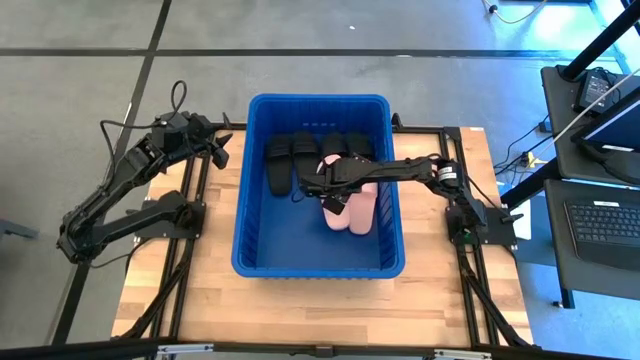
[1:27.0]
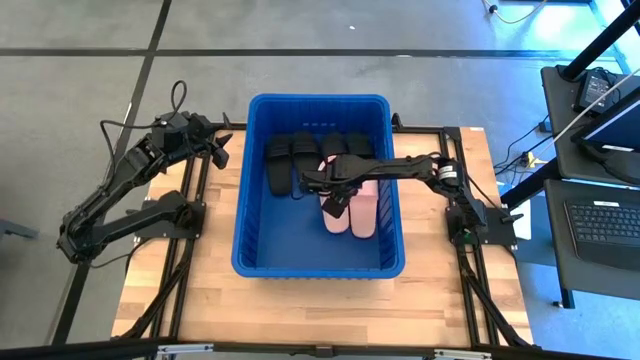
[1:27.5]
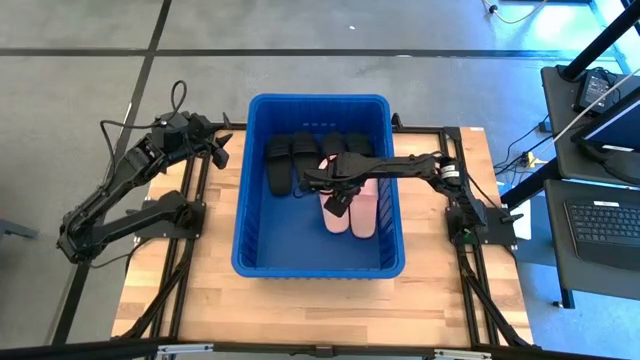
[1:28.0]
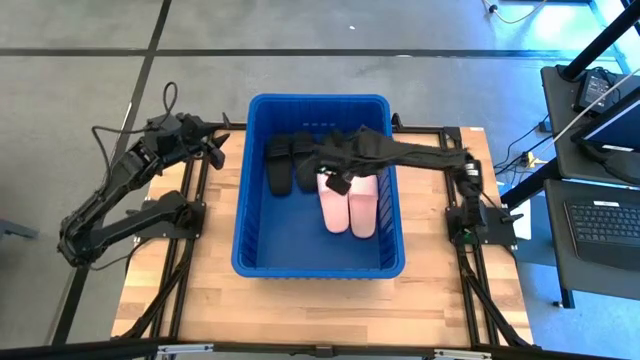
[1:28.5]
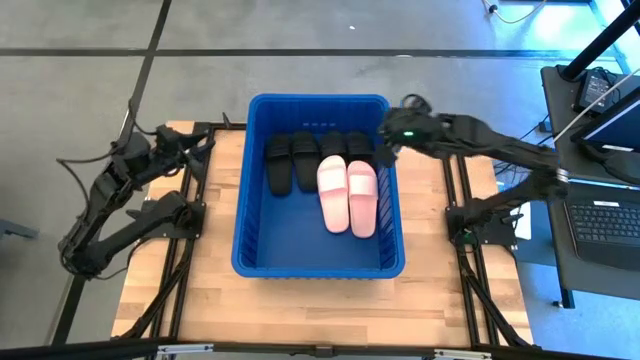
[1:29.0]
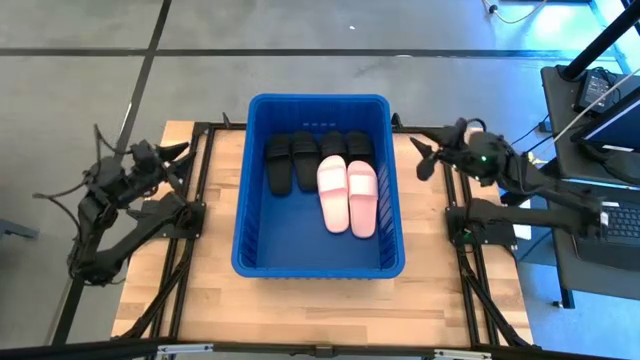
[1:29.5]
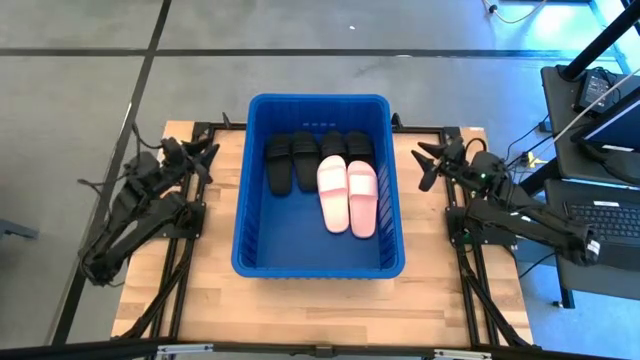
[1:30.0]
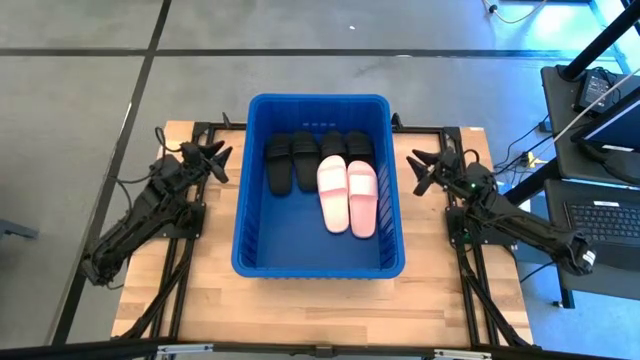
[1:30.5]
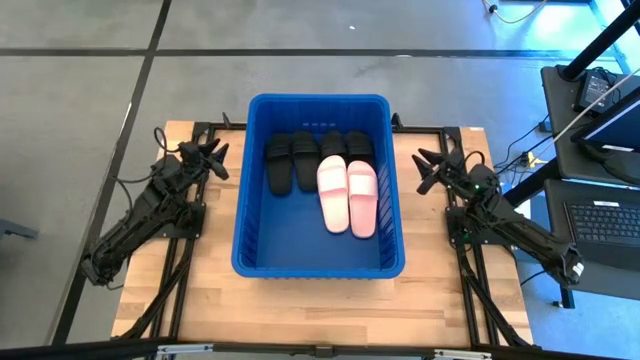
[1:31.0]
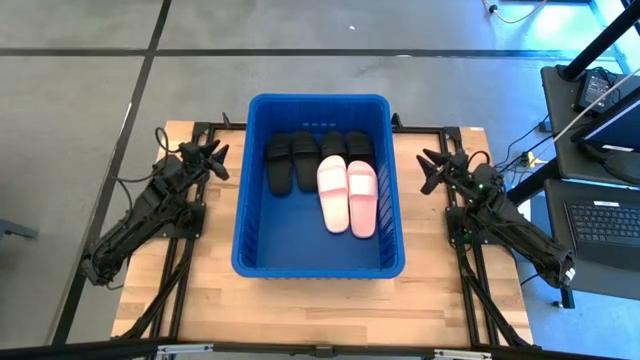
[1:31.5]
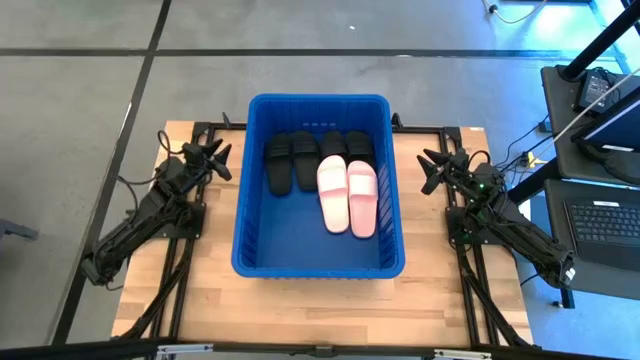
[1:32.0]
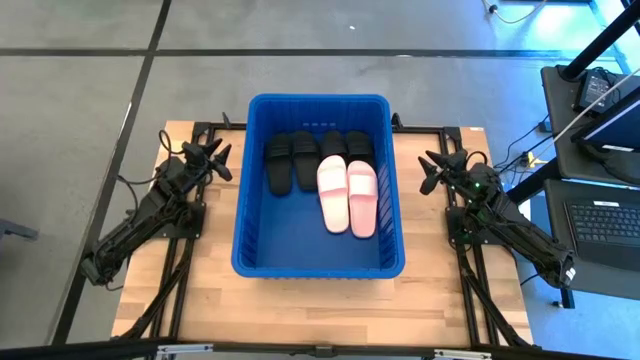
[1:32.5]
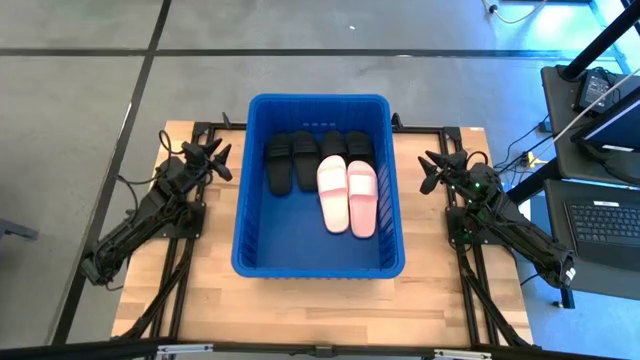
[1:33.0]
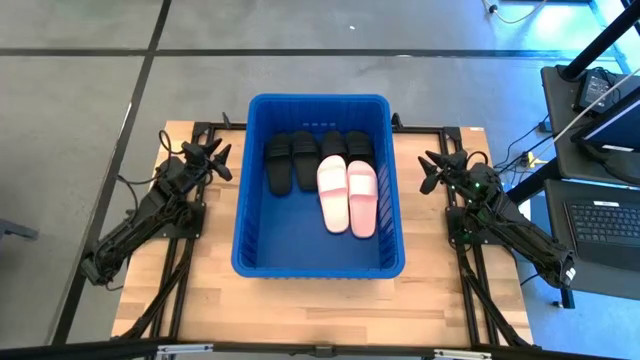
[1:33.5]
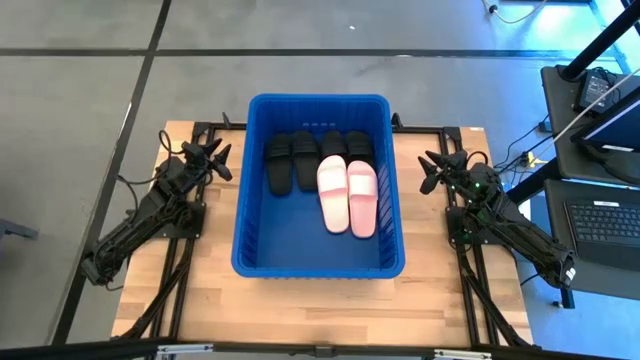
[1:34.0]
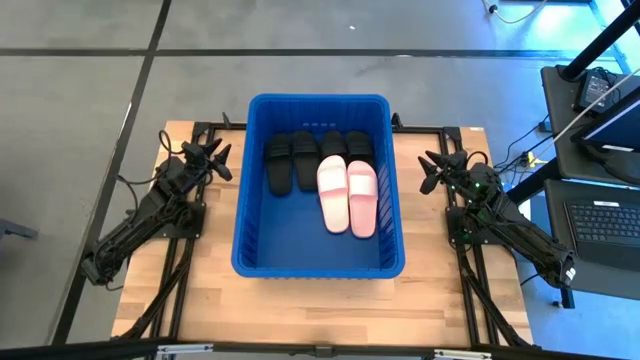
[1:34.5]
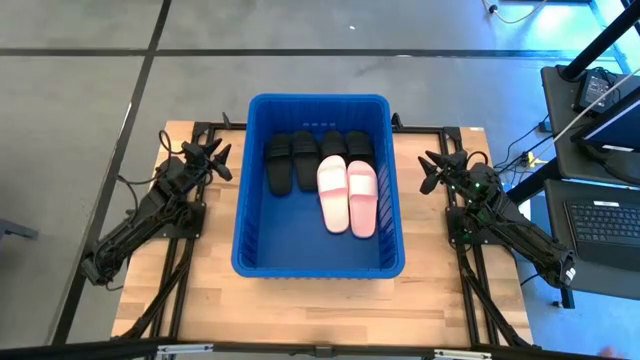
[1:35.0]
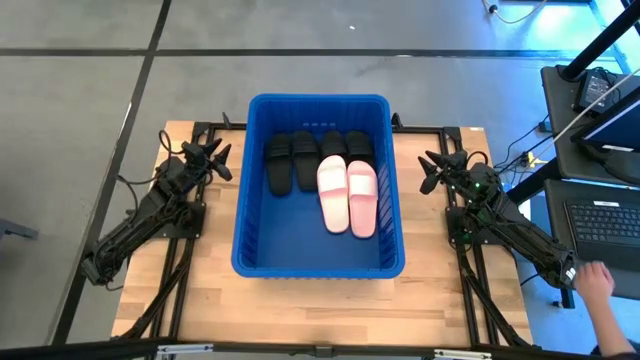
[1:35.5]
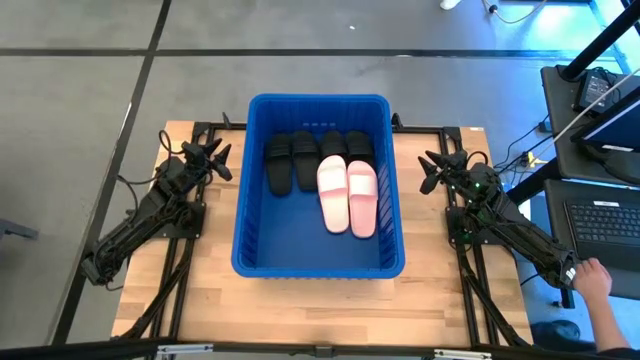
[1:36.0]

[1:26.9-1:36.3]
Task: Pick and place slides into bin
Return to Home Position

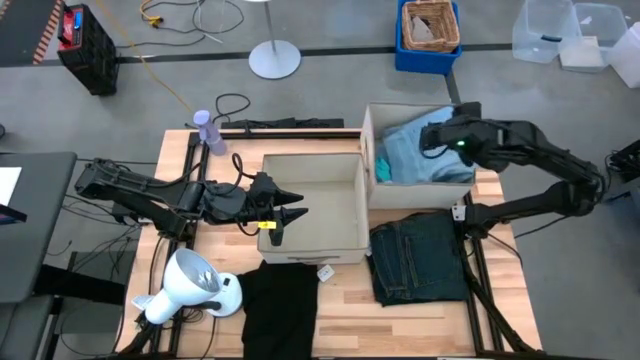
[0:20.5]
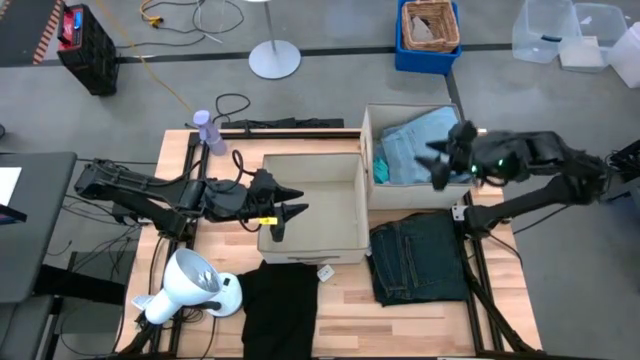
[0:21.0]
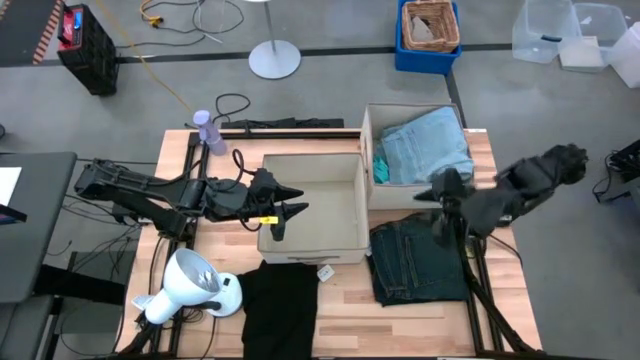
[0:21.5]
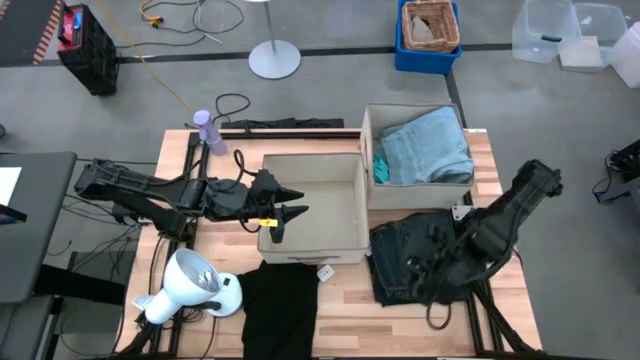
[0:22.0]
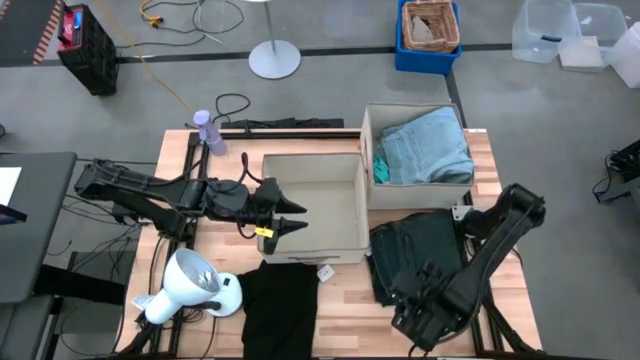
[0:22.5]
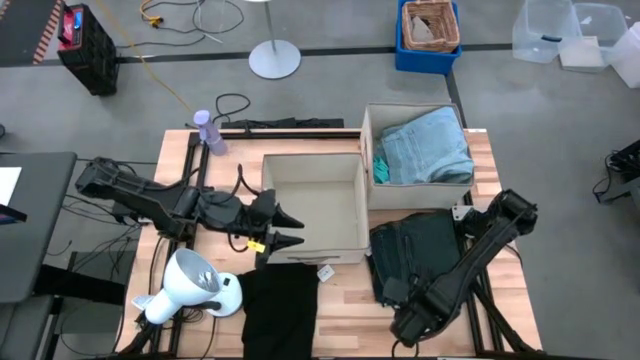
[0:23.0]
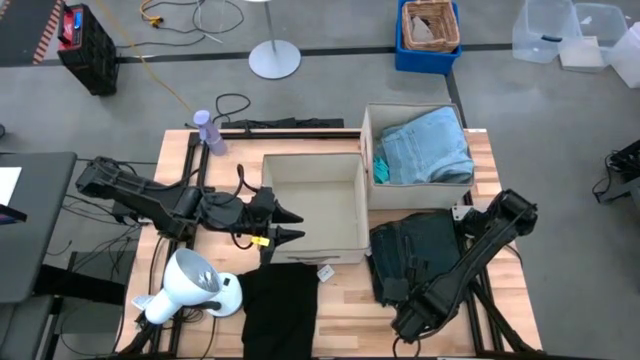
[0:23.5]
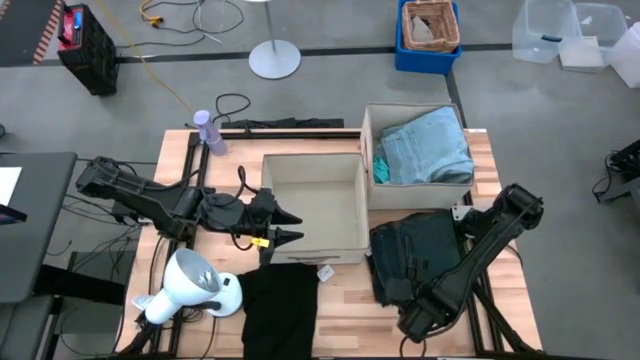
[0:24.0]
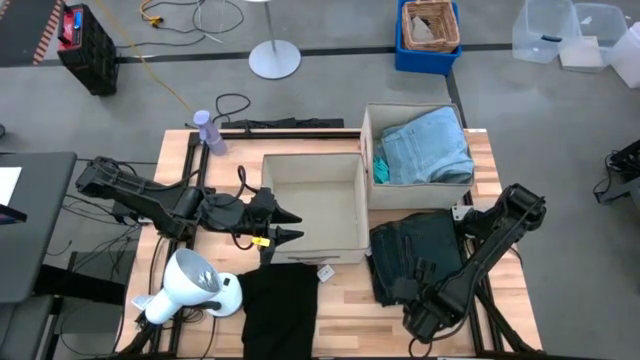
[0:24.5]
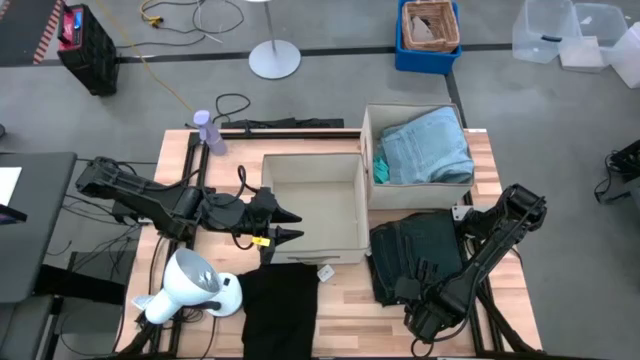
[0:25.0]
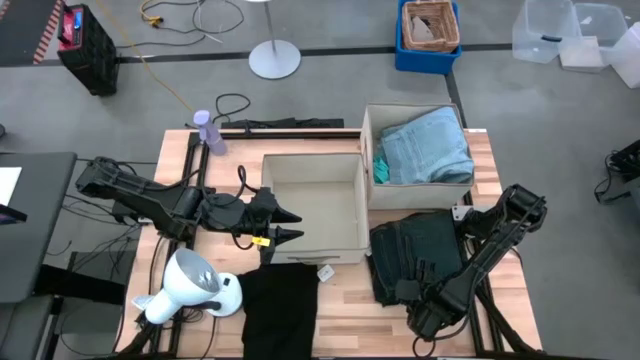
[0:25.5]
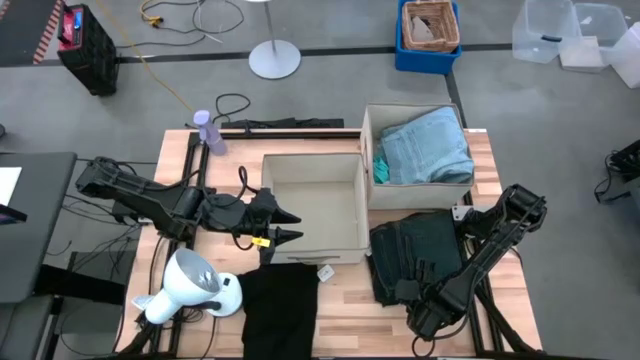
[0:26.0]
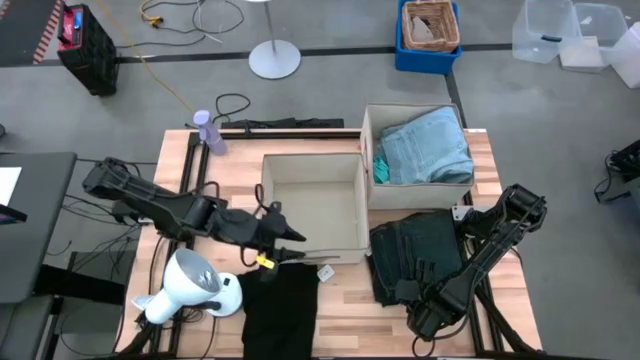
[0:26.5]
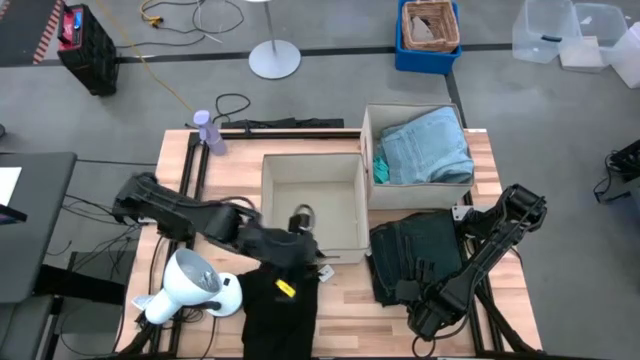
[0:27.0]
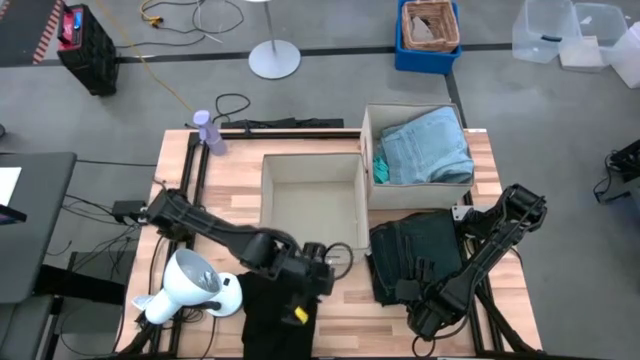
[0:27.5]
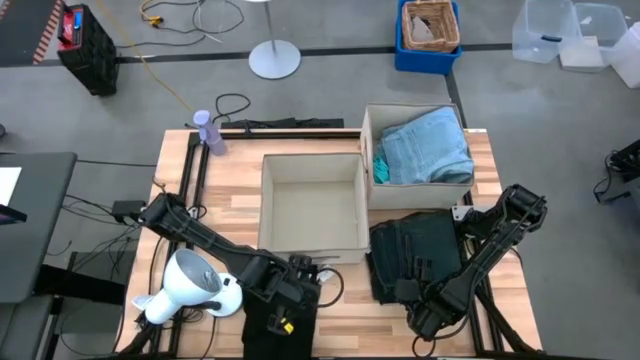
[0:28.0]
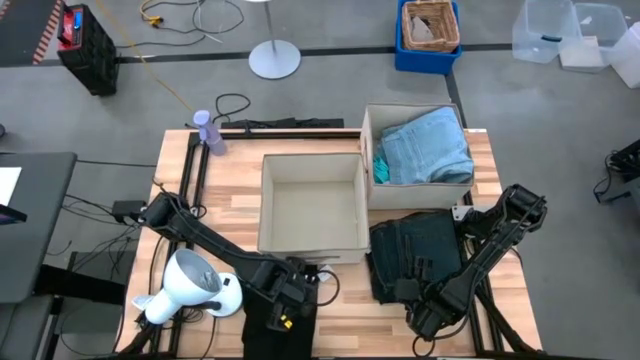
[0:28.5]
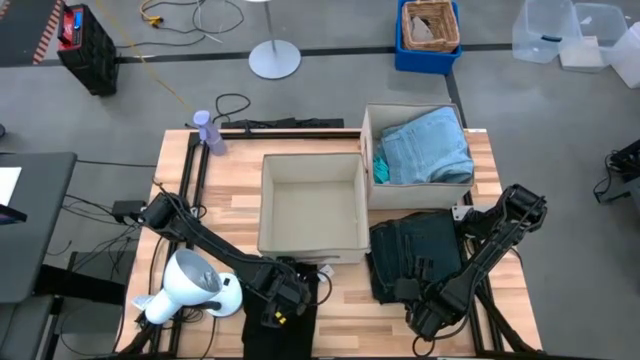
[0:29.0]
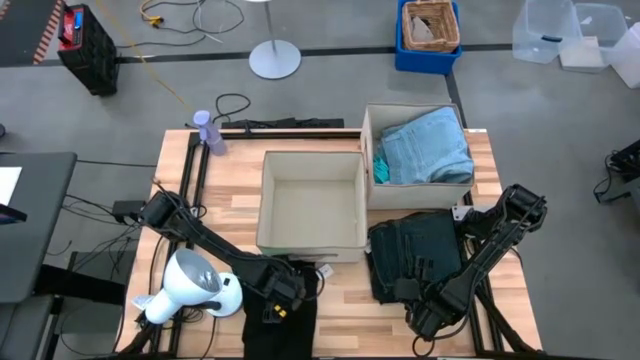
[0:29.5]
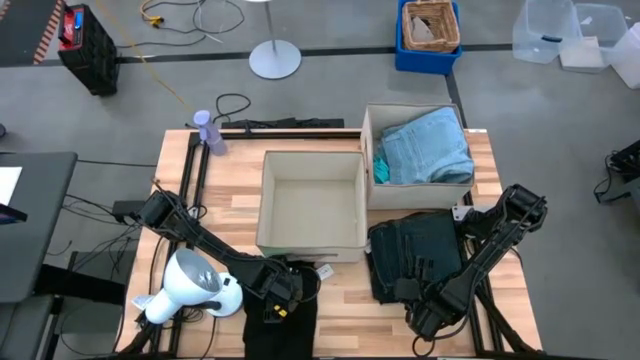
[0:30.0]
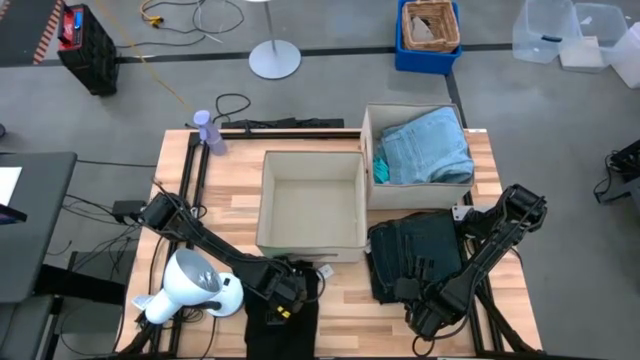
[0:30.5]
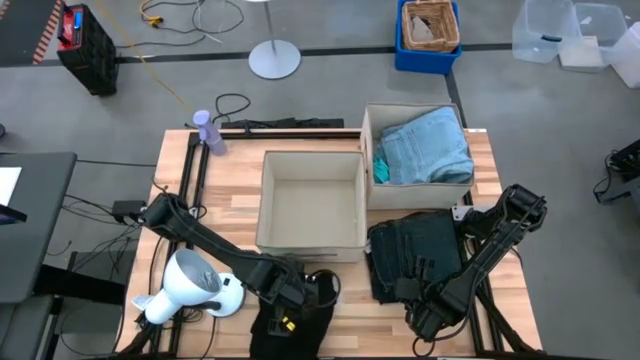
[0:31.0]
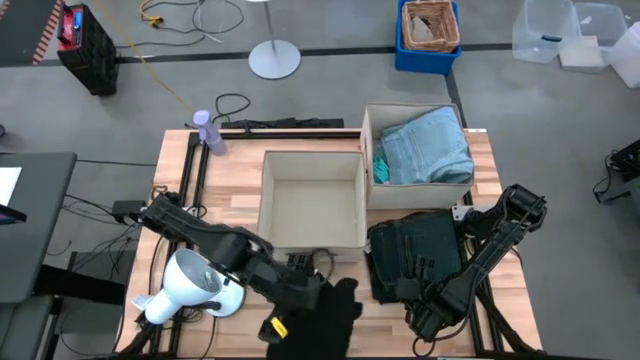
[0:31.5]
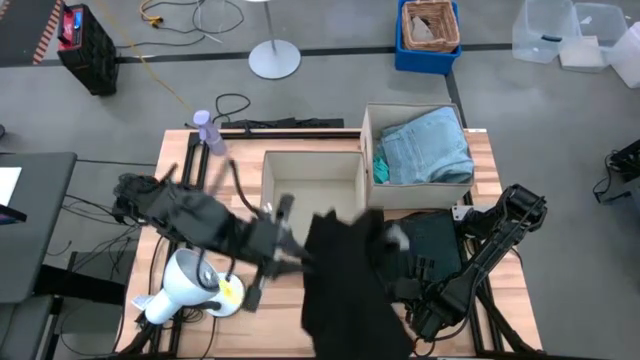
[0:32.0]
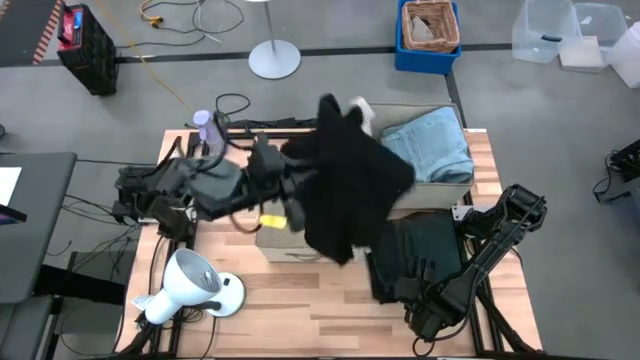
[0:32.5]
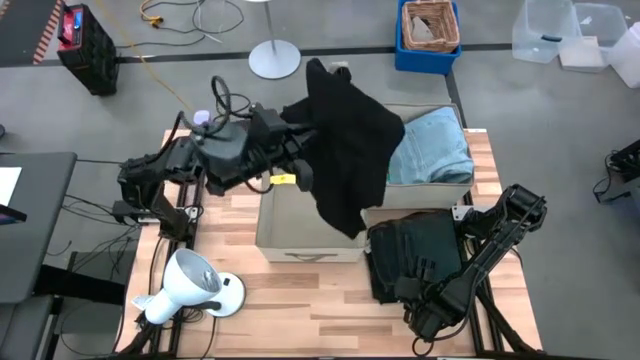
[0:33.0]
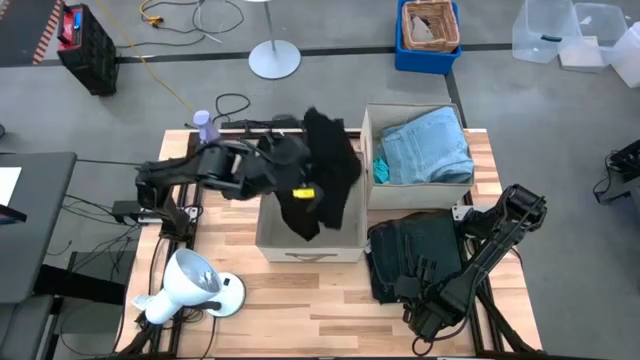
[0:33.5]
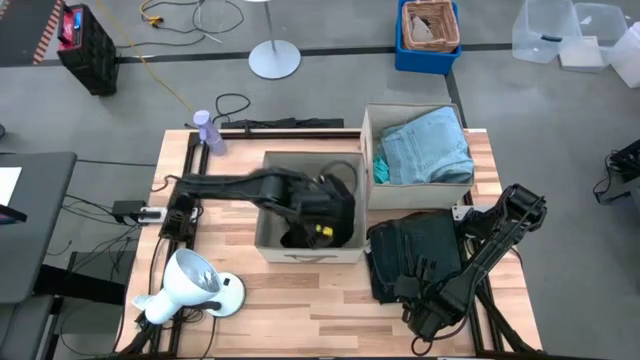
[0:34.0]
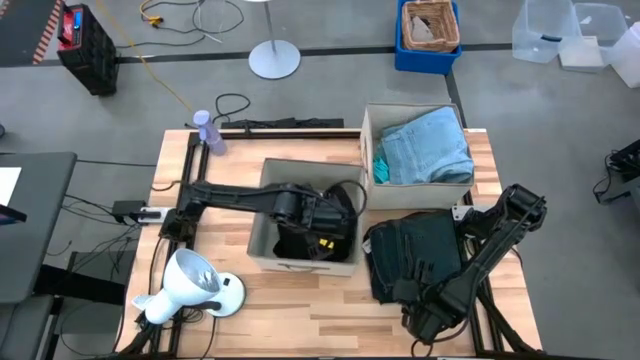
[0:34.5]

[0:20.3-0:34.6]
Task: Sort clothes
Put the black shirt in the left brown bin
